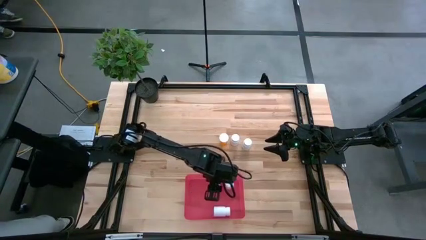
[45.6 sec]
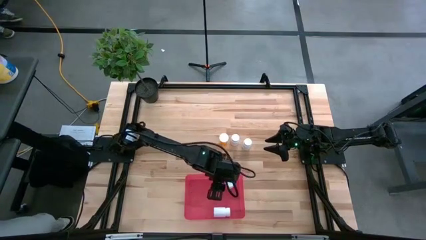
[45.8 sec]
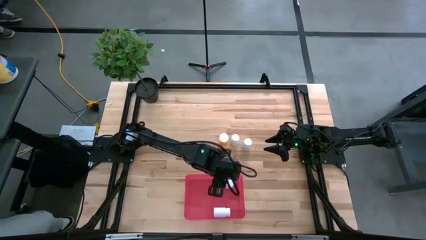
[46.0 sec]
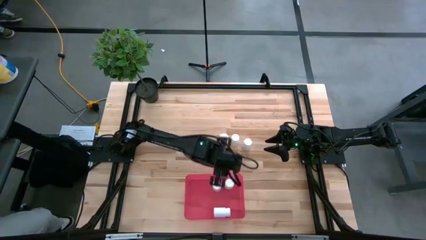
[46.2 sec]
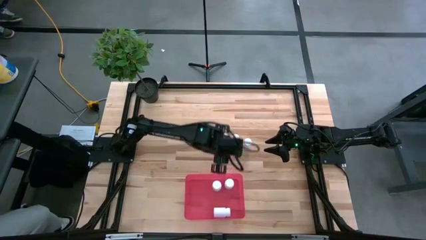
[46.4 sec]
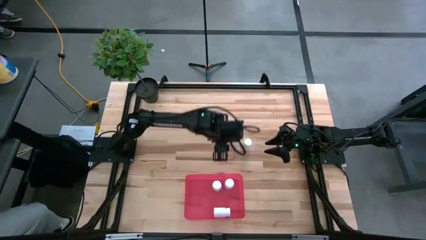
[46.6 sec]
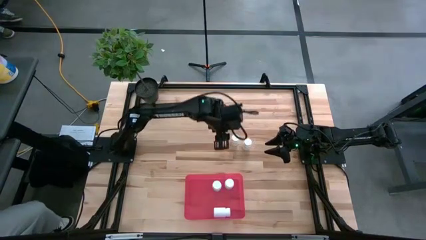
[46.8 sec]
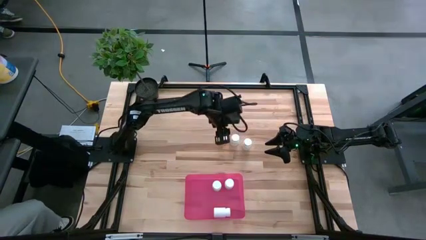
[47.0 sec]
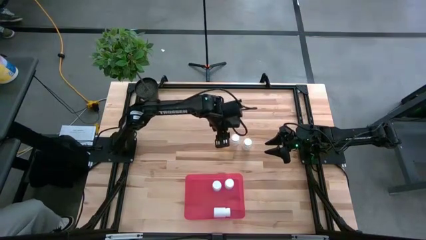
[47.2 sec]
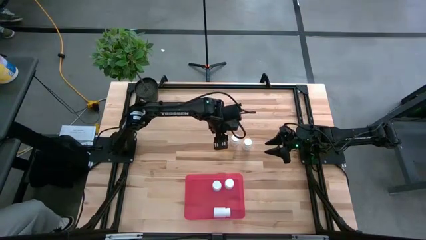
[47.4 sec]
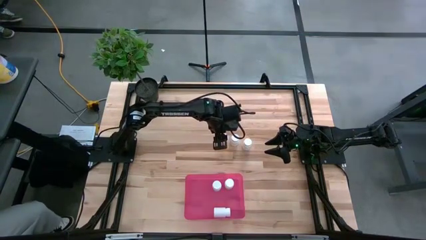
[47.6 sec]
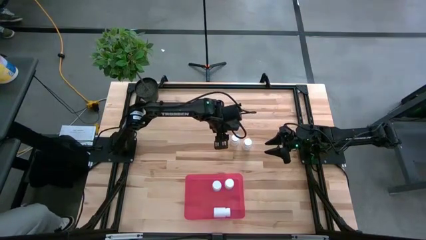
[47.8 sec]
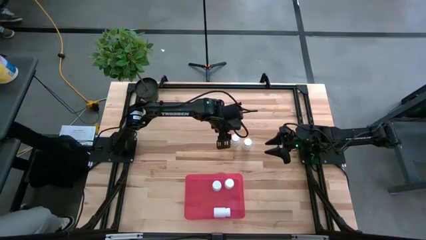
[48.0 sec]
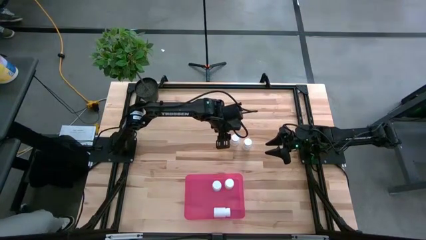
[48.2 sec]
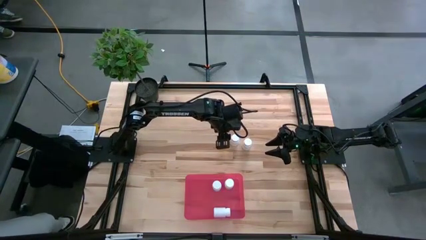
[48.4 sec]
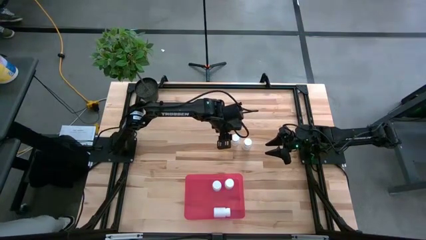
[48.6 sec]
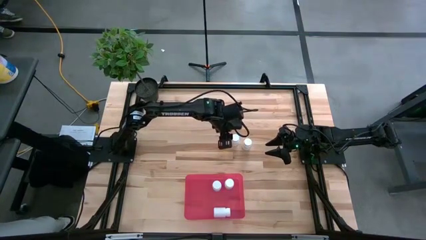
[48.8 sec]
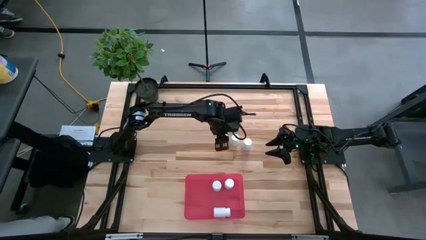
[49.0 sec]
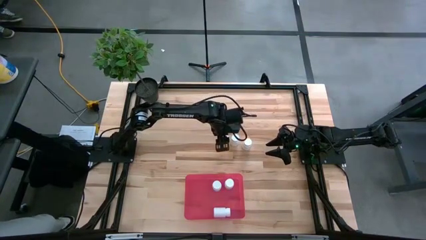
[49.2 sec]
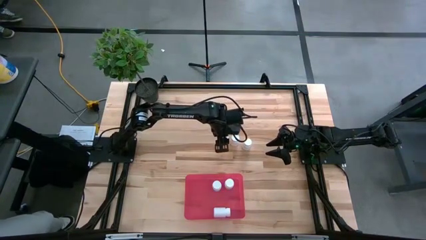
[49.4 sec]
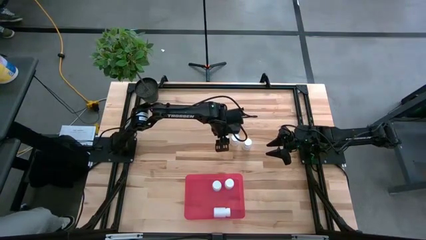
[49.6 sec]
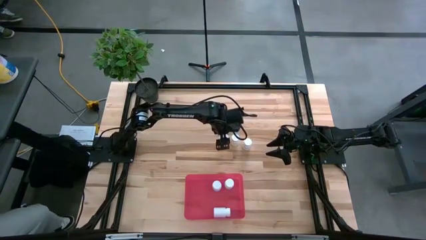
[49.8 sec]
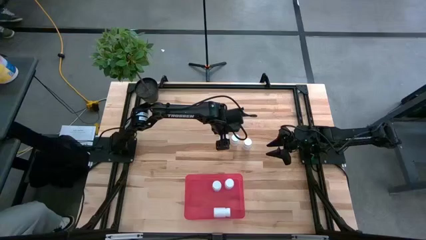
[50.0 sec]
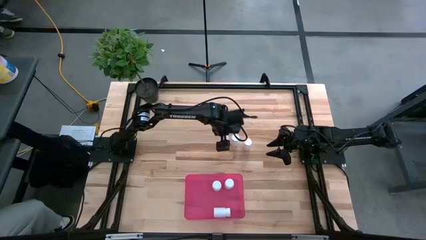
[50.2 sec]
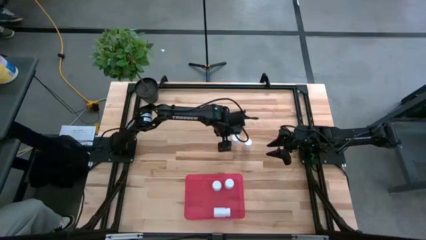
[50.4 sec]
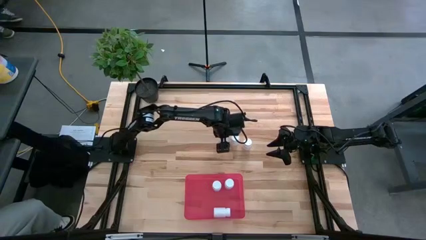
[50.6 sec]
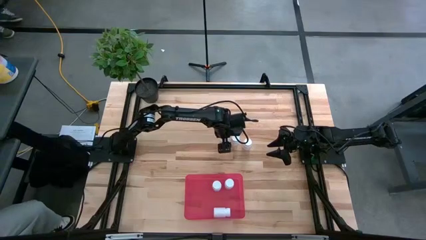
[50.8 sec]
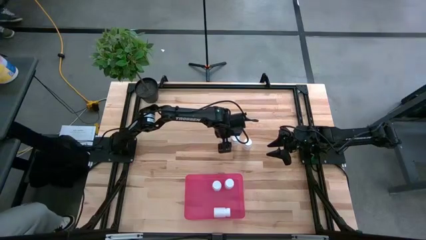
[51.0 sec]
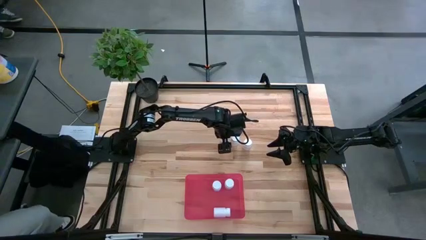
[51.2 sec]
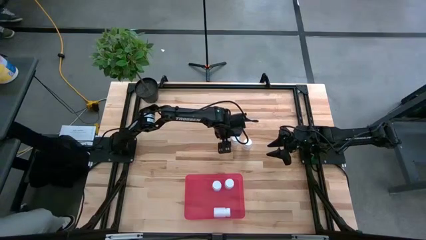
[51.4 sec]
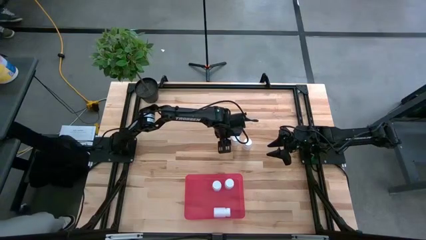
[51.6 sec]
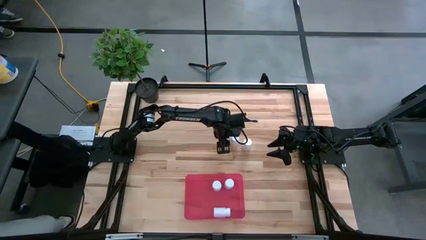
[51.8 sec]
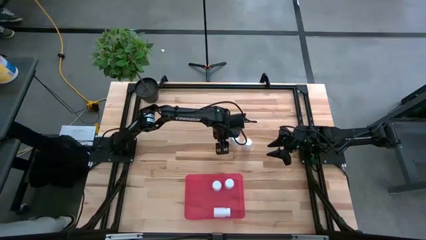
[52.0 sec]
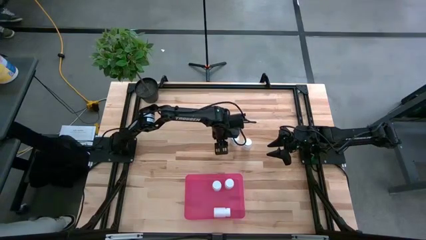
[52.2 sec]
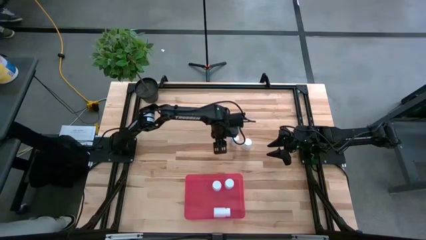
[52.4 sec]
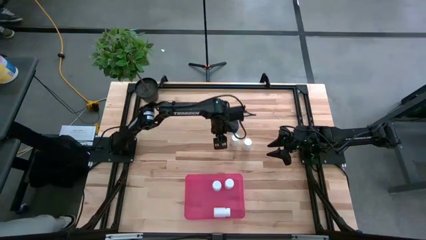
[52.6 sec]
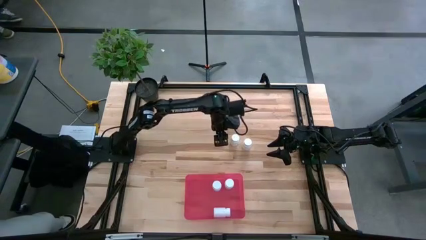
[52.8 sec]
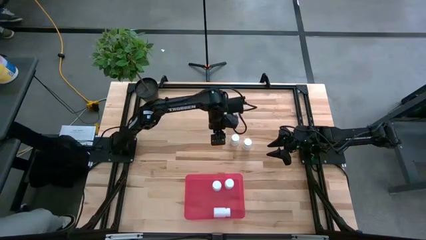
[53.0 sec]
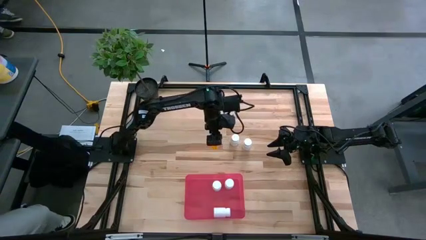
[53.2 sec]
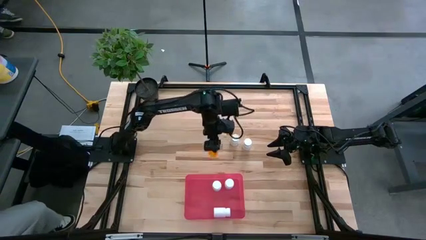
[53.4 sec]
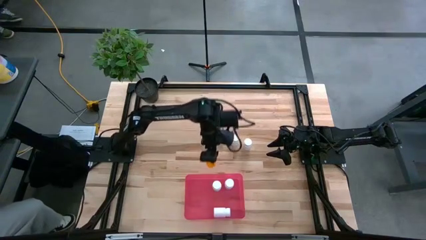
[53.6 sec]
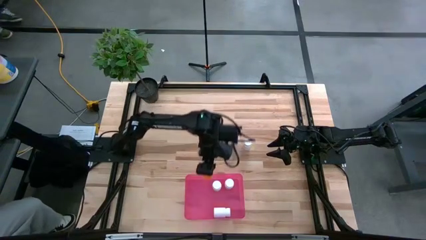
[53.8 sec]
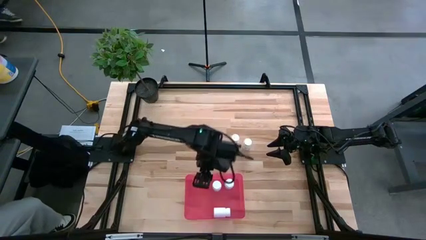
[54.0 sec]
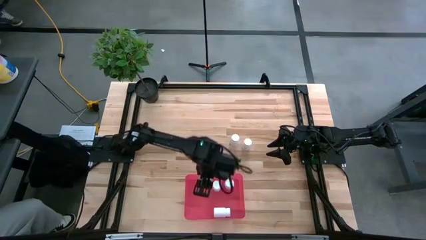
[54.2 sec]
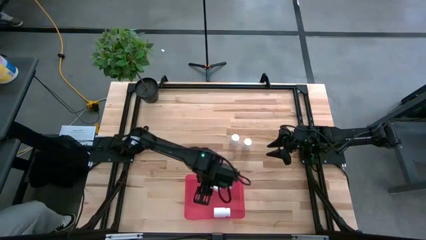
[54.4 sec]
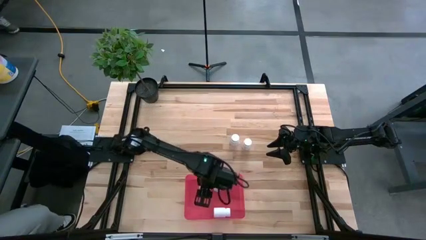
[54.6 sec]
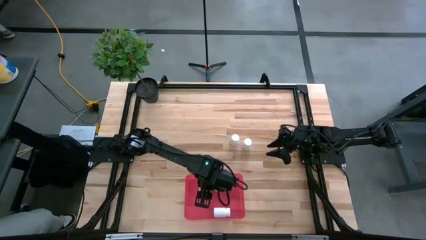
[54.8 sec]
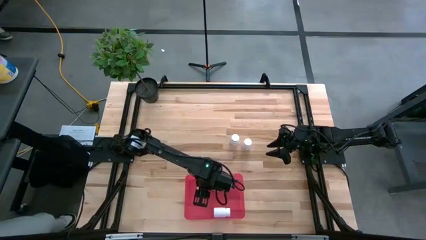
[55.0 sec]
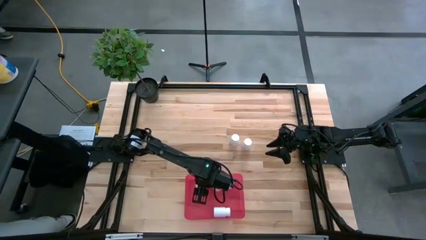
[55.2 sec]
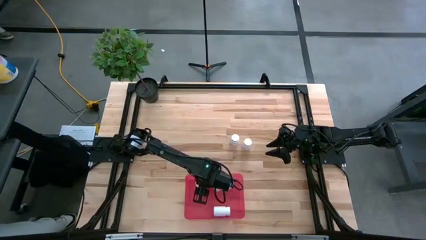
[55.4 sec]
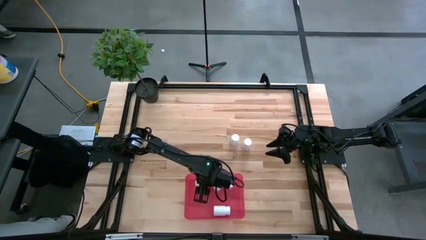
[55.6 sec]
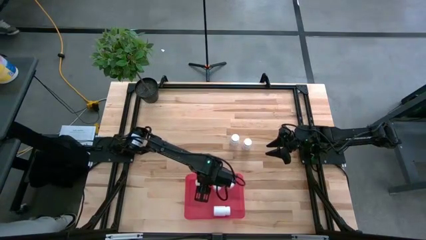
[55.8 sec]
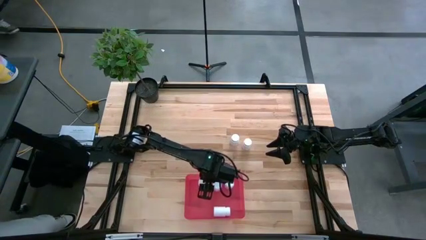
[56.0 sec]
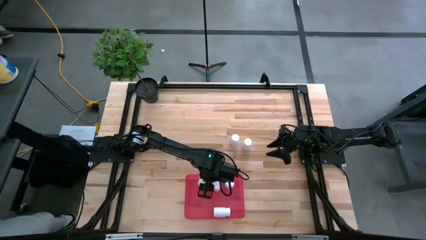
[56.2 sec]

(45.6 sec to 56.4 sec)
Task: Pick and place pill bottles into a basket
Put the orange pill bottle into the red bin

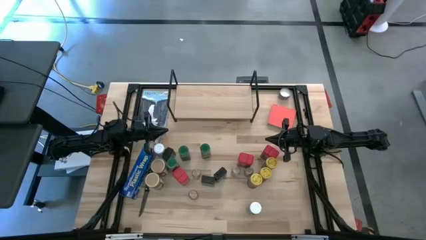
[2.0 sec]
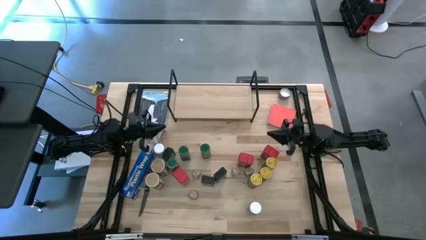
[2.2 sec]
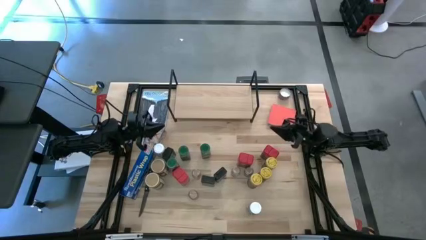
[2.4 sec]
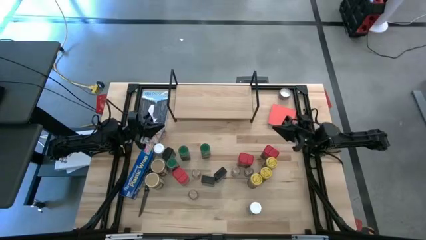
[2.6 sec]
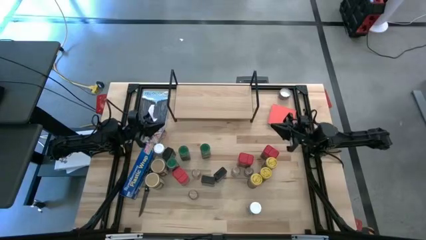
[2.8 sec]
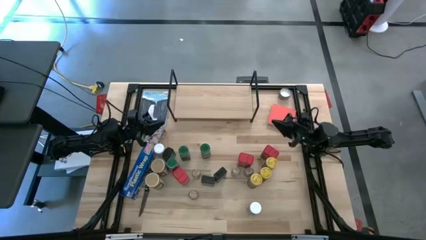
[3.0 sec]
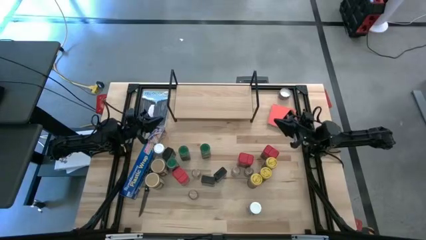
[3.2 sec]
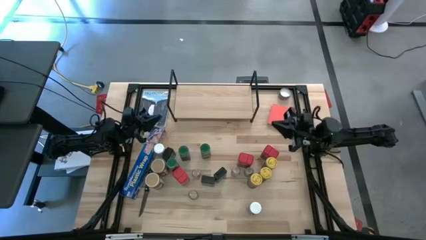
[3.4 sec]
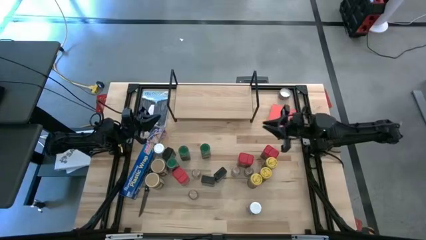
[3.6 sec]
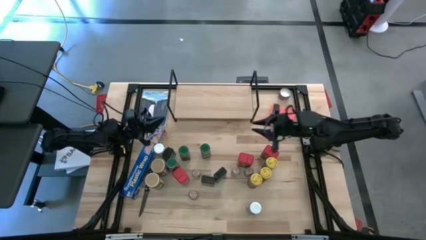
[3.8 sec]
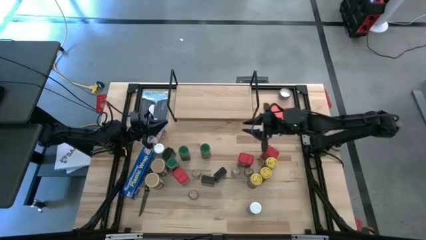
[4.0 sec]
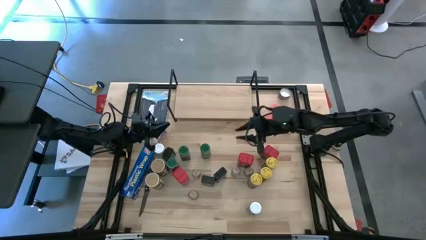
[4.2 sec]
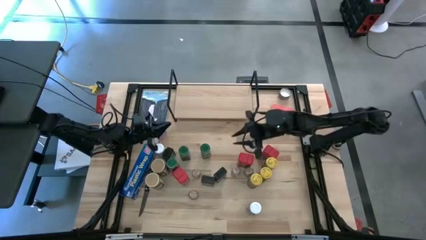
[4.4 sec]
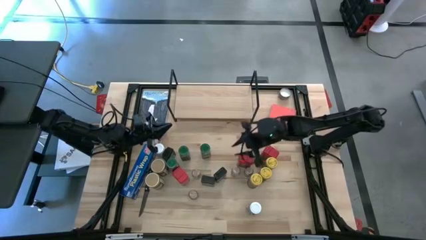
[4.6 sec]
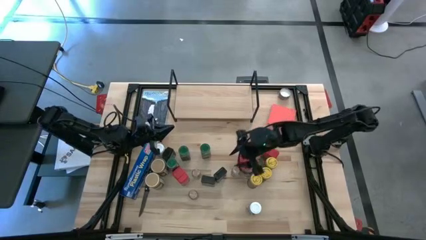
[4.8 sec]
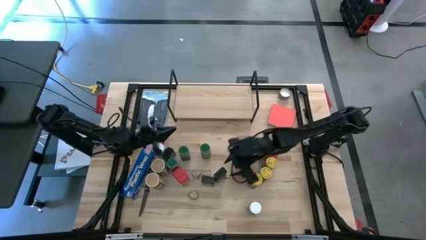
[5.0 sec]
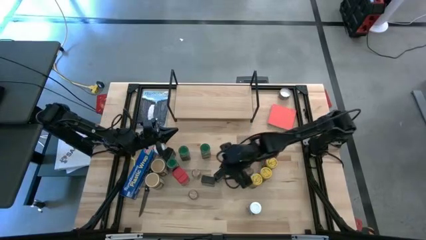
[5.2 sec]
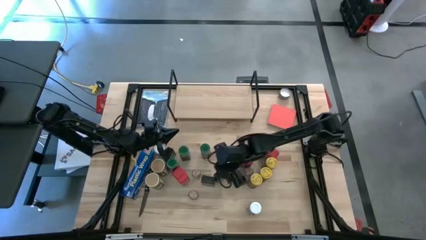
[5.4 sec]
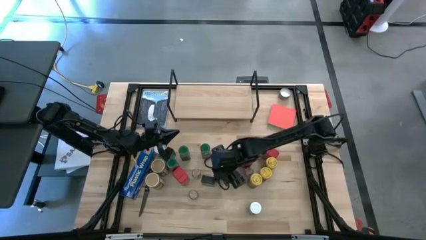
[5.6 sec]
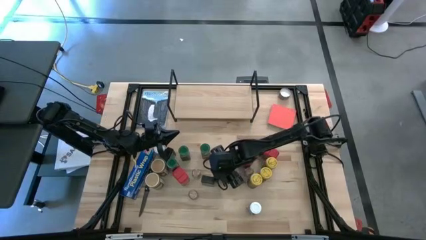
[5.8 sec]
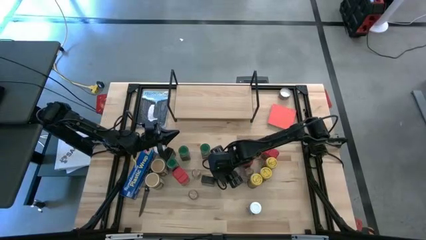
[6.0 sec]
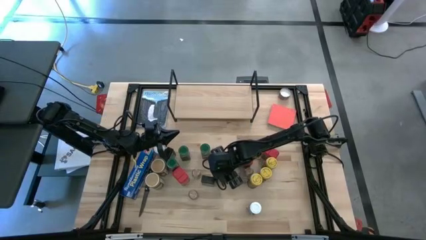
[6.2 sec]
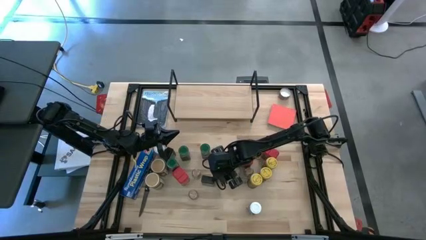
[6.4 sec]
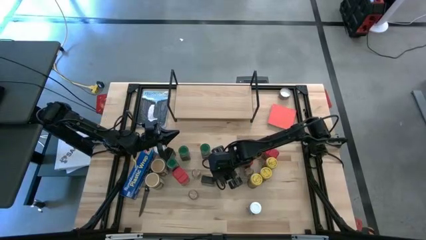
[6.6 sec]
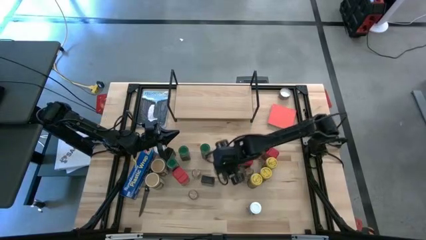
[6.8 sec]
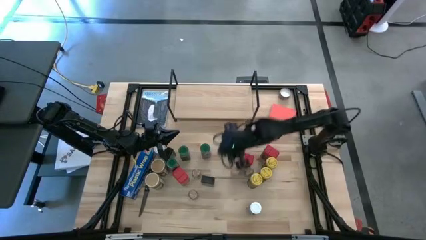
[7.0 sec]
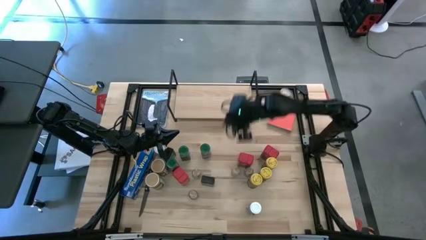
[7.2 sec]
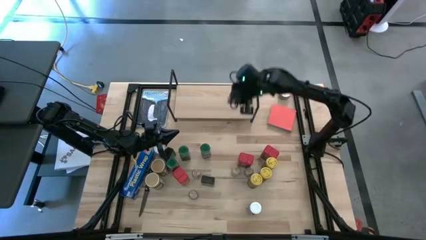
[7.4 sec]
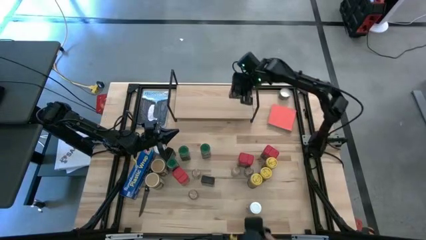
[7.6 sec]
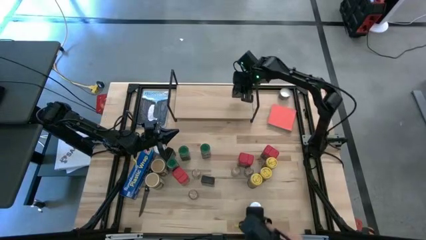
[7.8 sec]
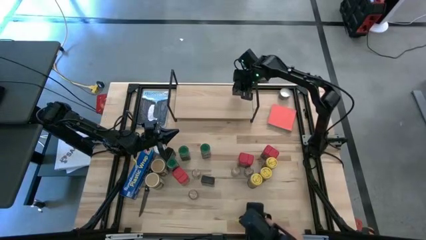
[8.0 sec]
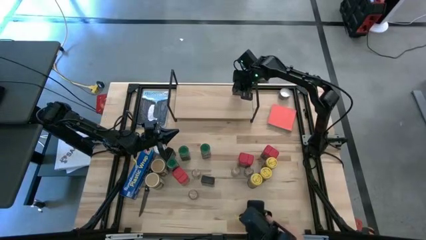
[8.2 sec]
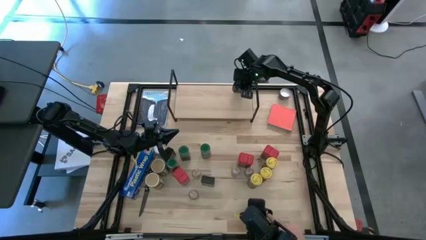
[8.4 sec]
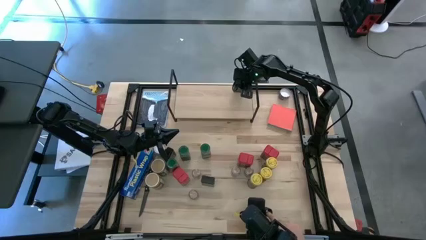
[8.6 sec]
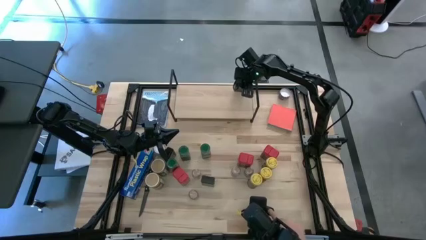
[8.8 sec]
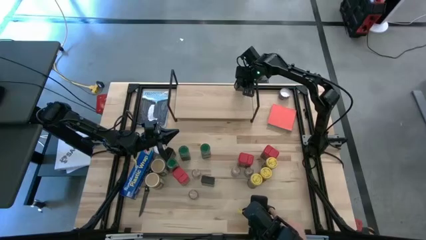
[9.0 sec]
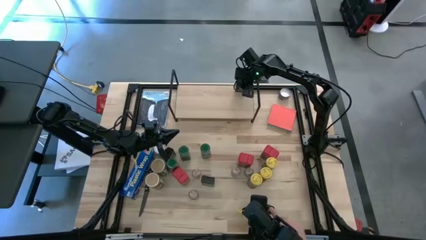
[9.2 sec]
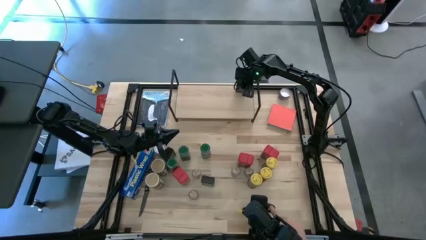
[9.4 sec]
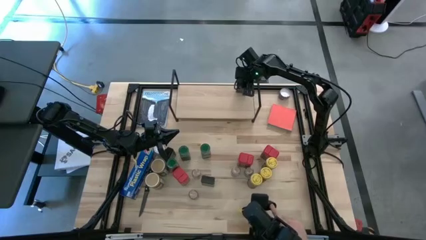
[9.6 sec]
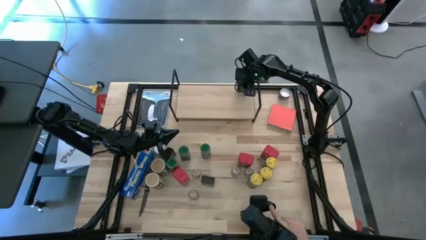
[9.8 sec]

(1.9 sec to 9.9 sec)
Task: Shelf spices
Put the black seasoning can on the shelf
